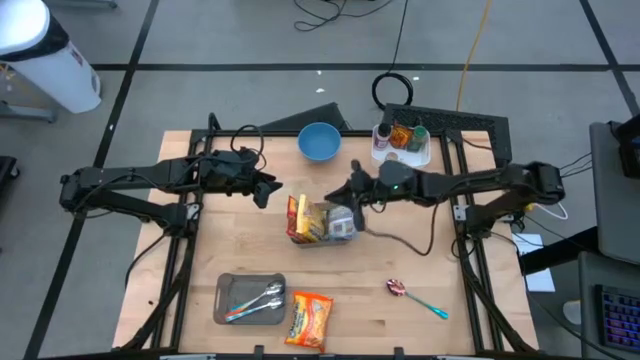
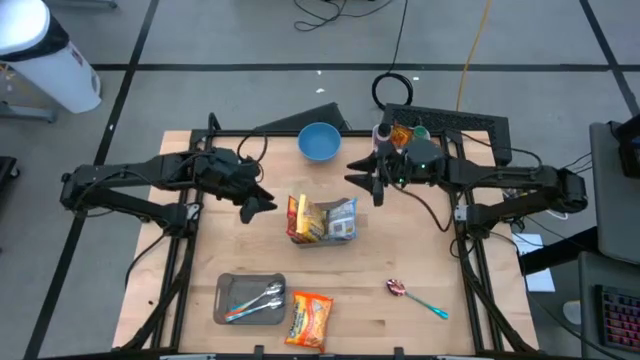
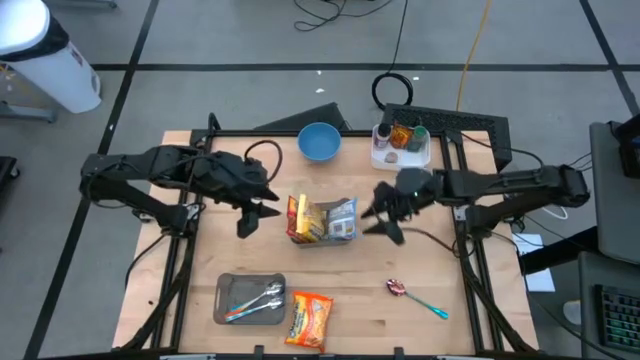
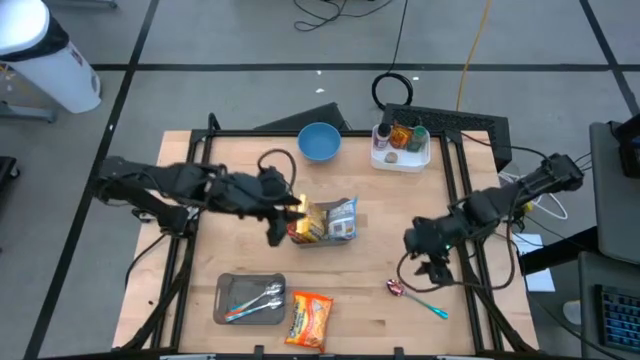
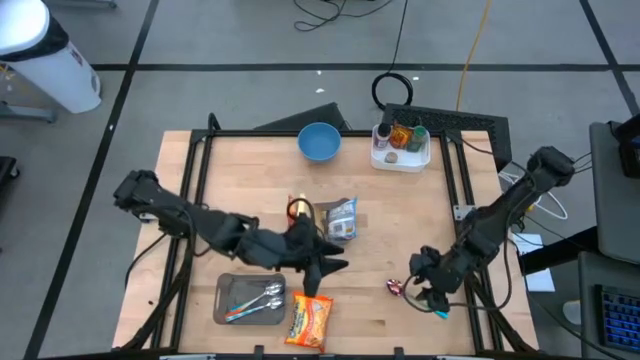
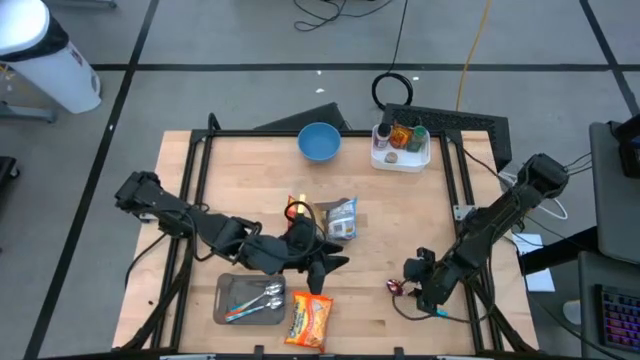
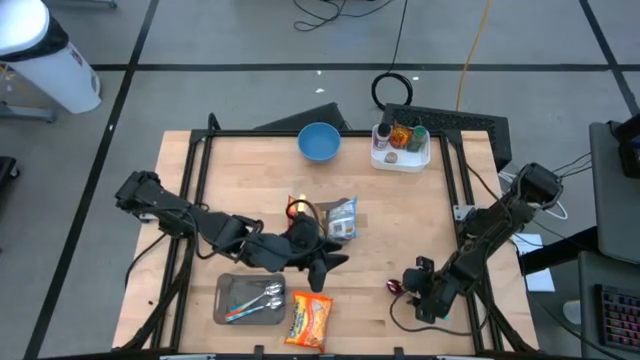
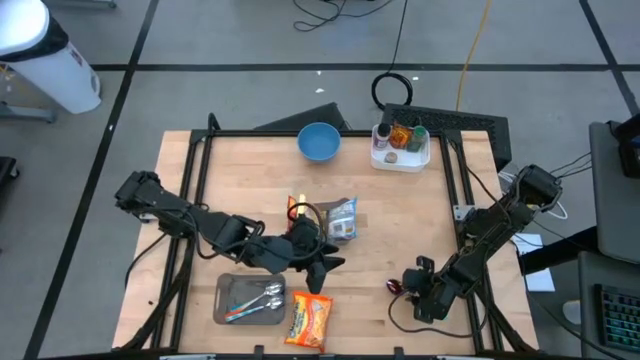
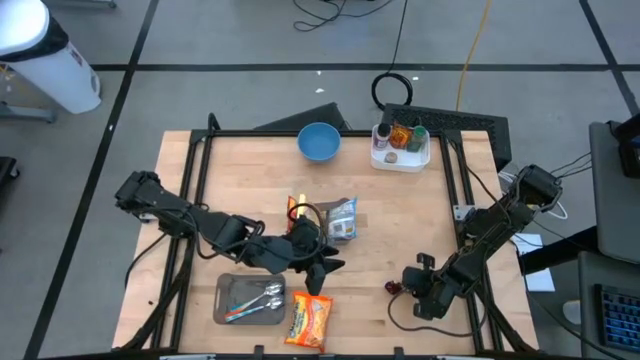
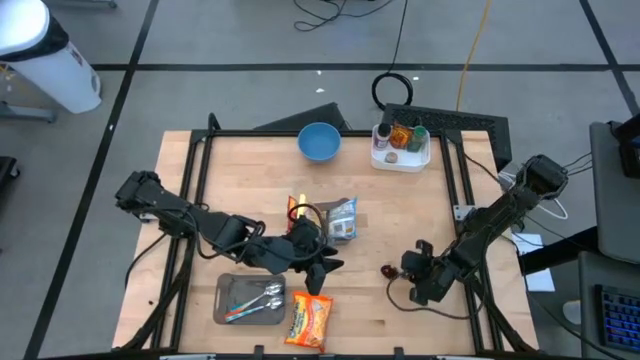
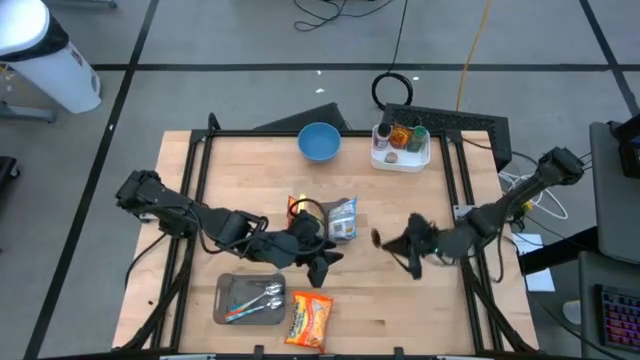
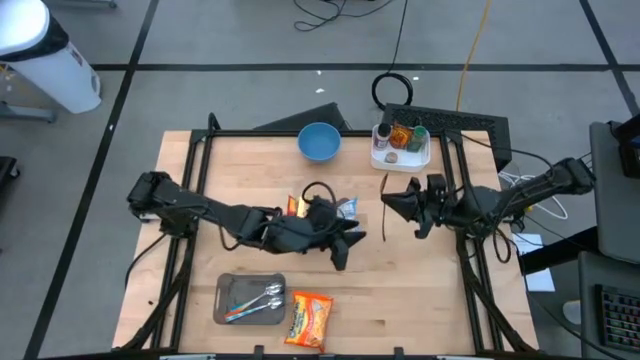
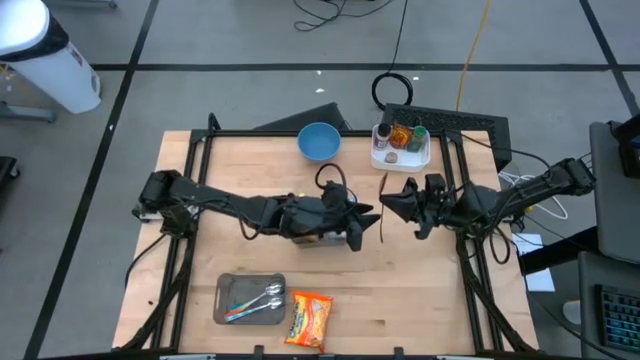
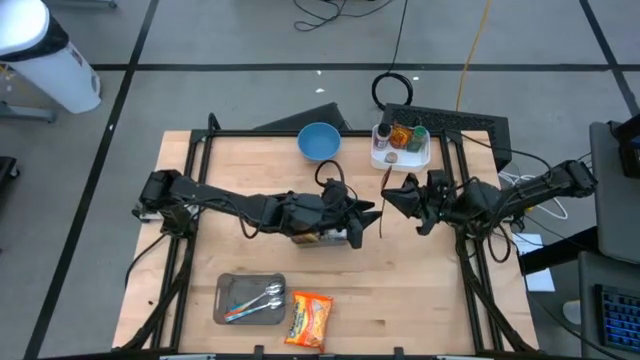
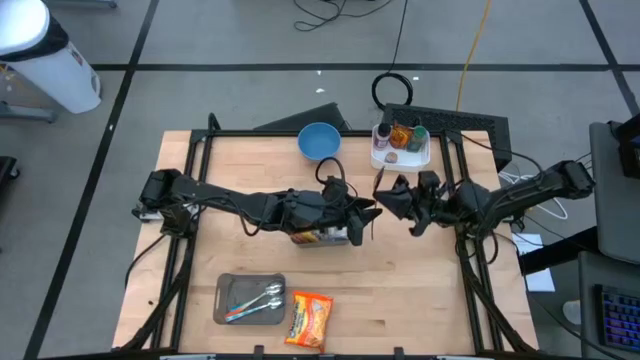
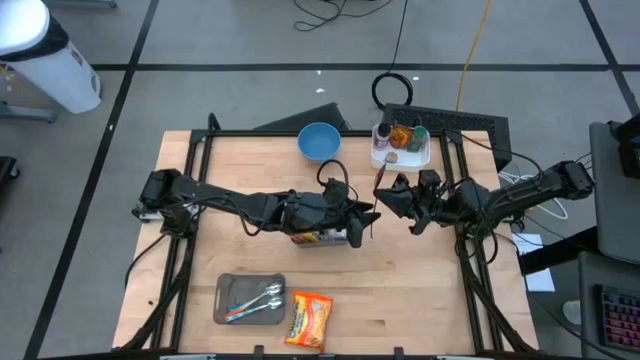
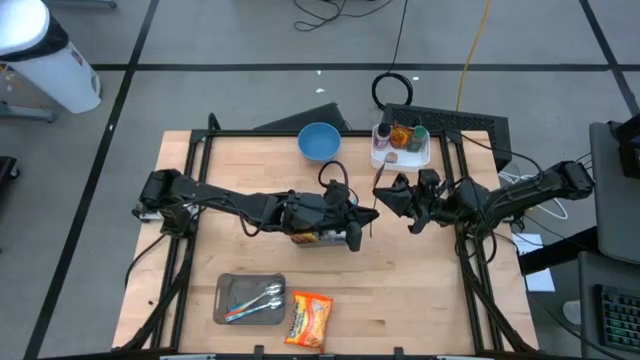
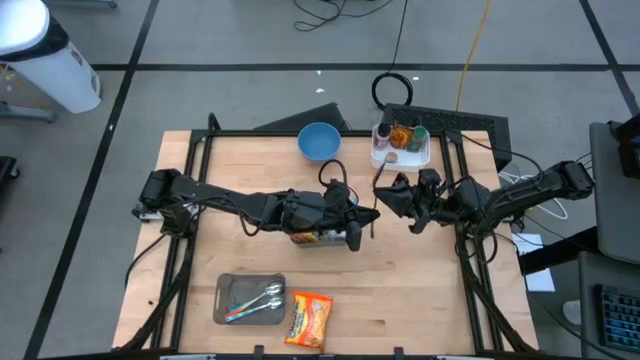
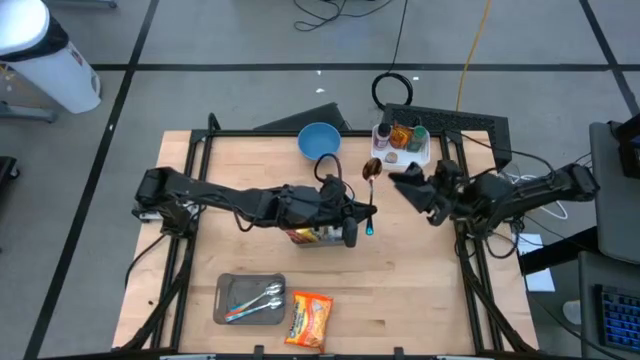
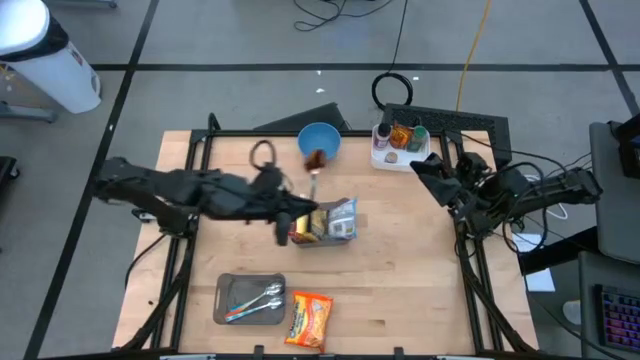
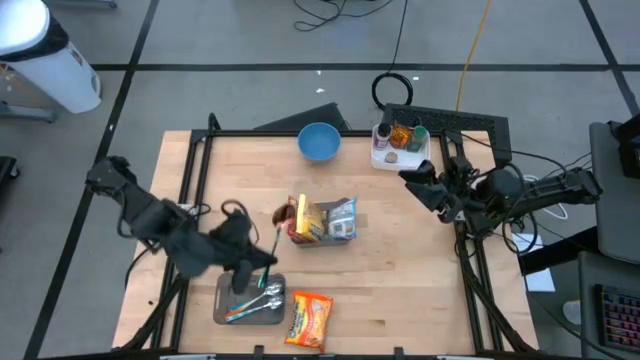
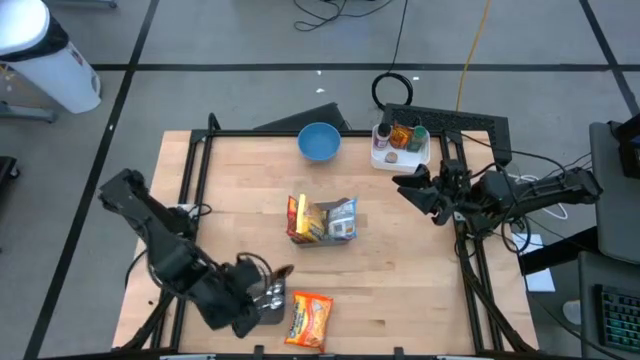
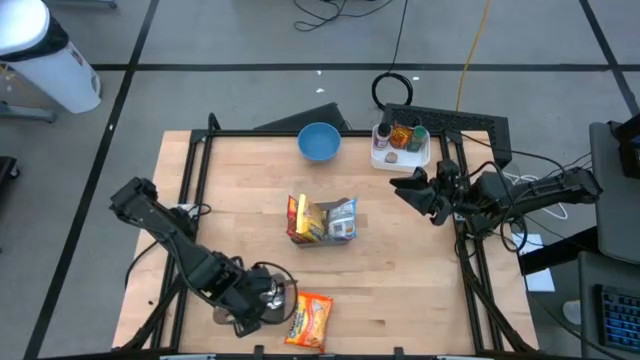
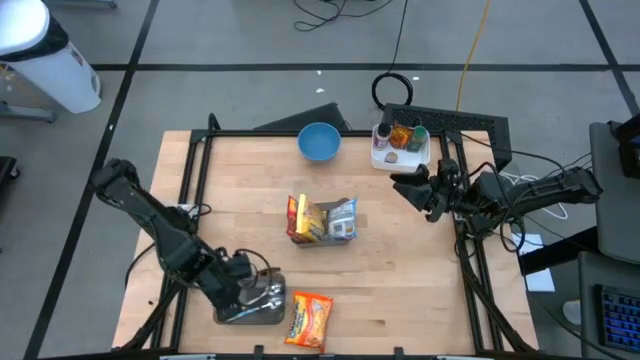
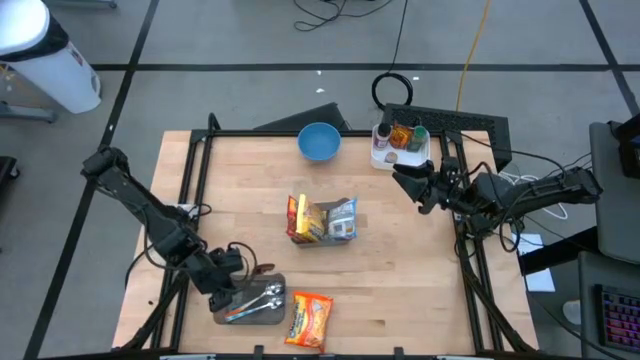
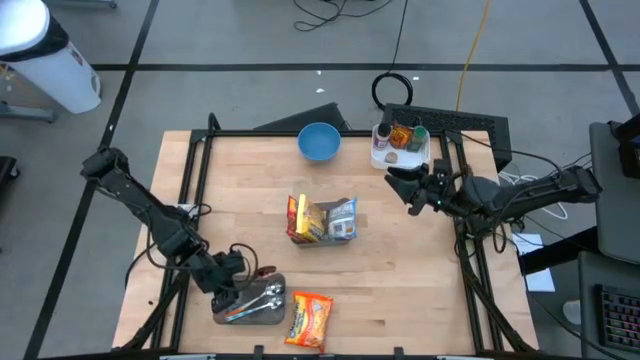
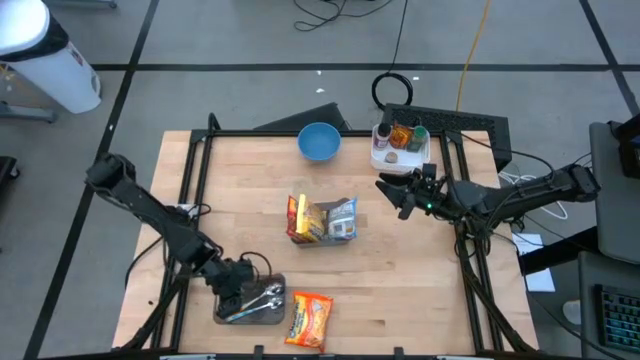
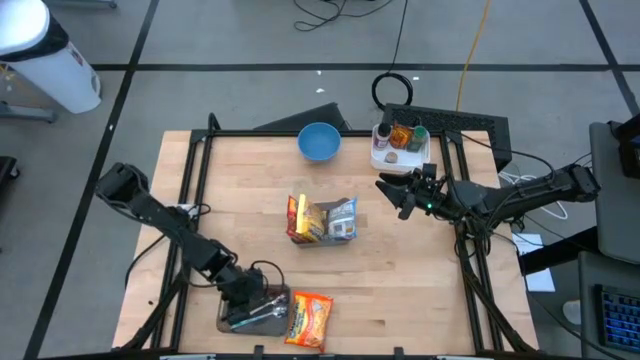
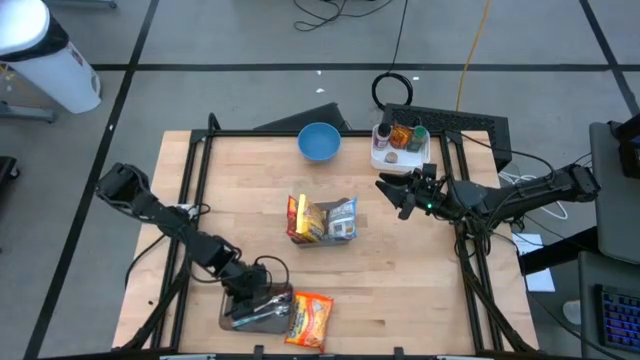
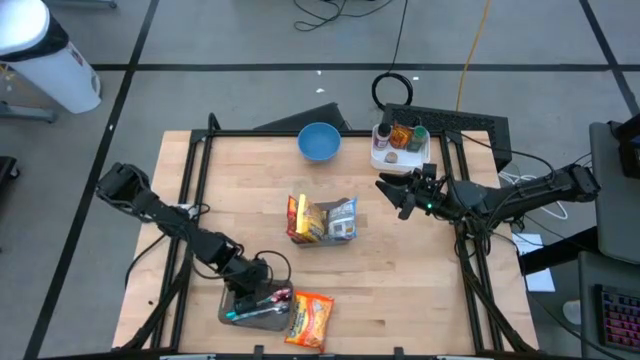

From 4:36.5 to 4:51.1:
Task: Pick & Place Food Item
Put the blue spoon into the bottom black bin

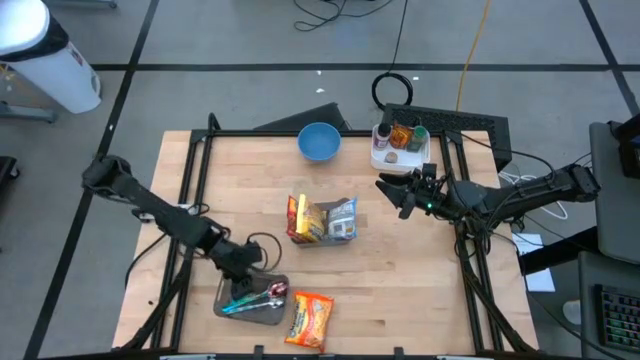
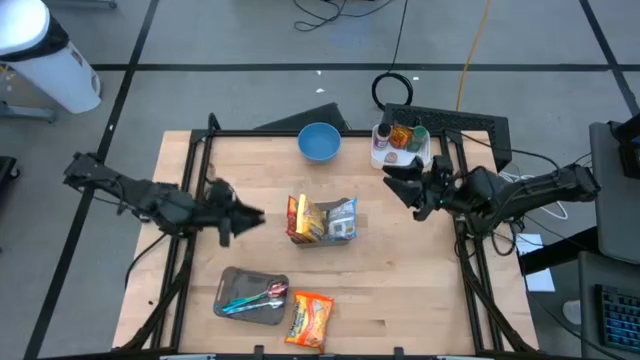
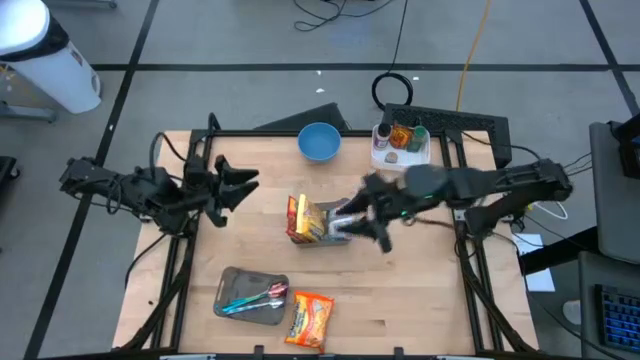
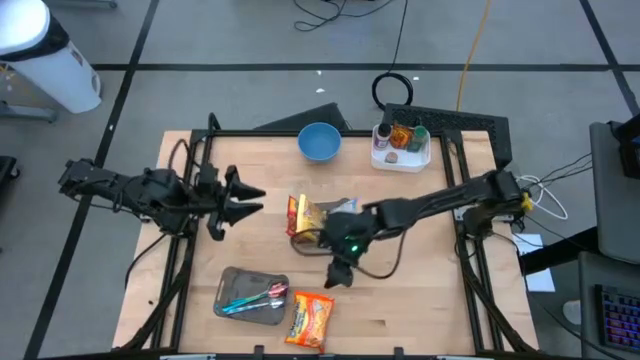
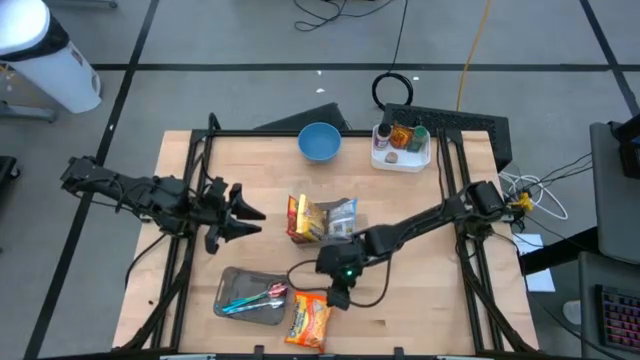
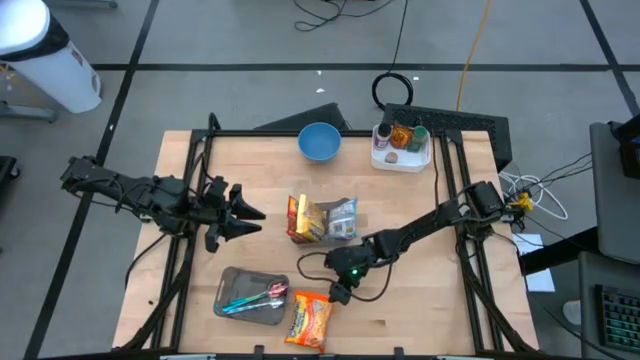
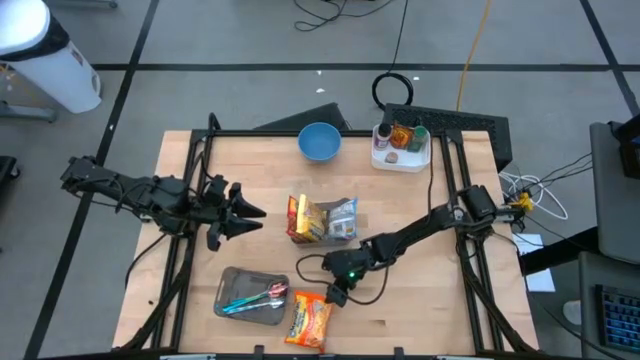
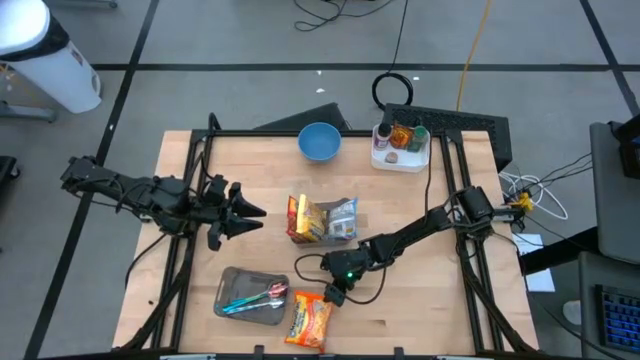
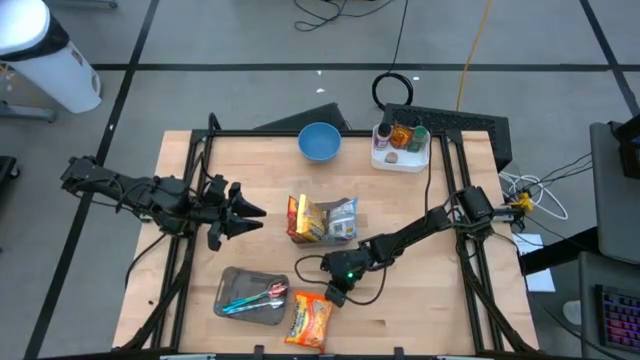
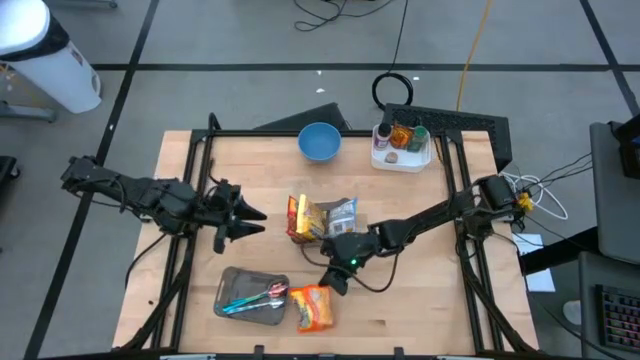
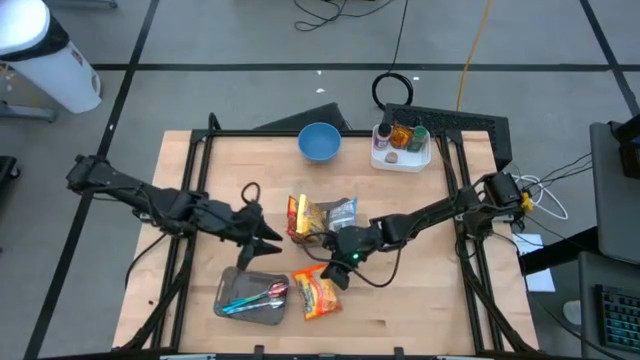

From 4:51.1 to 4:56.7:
Put the orange noodle pack into the top black bin
